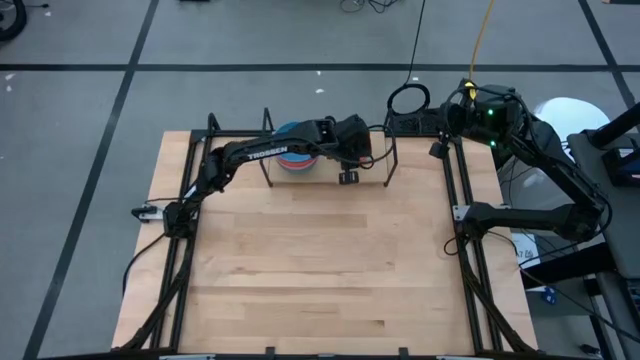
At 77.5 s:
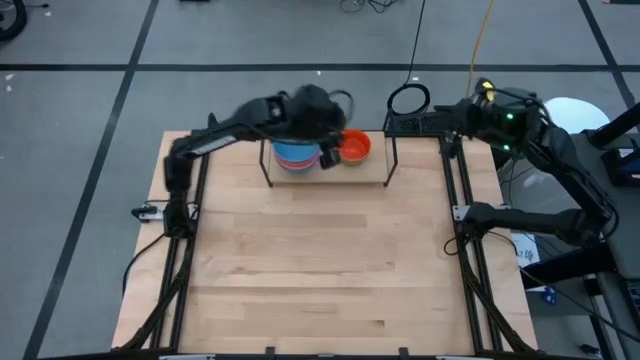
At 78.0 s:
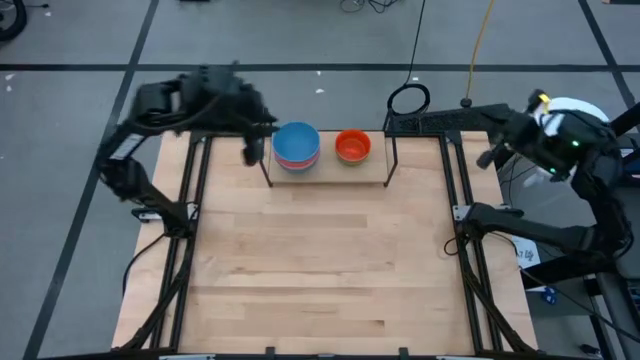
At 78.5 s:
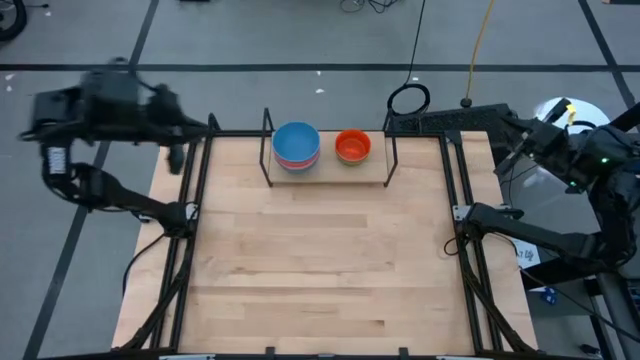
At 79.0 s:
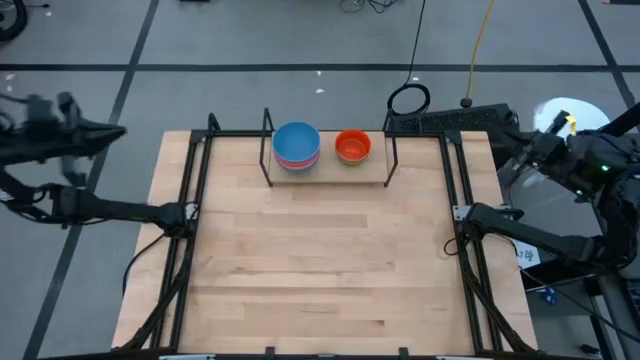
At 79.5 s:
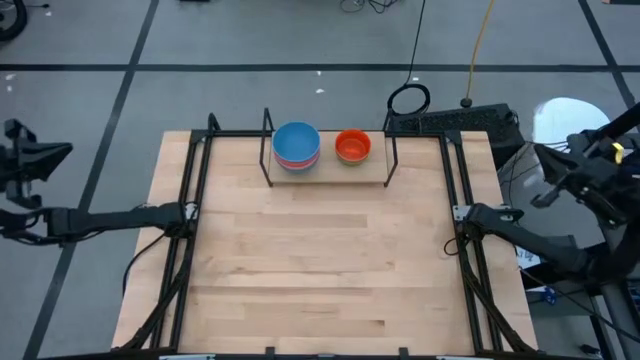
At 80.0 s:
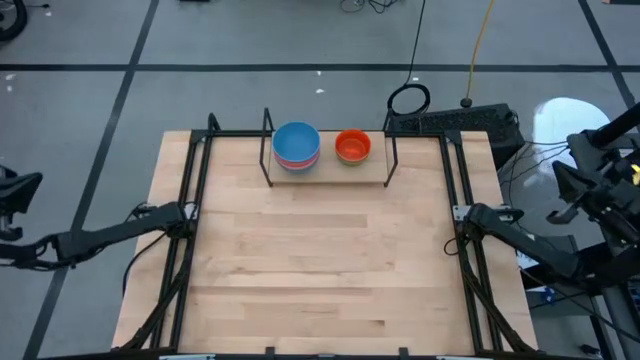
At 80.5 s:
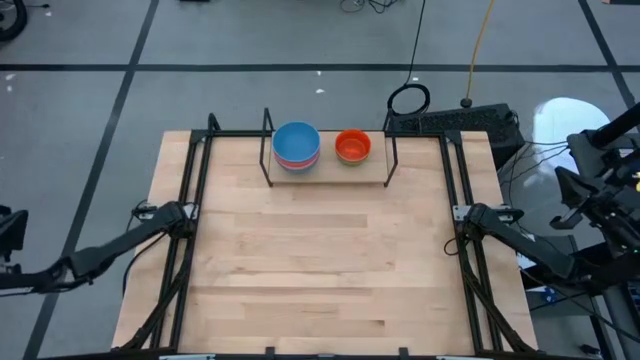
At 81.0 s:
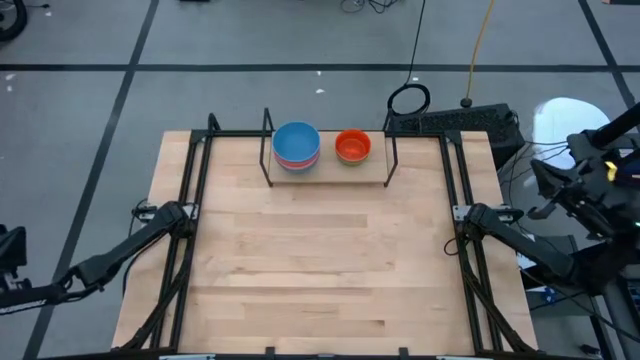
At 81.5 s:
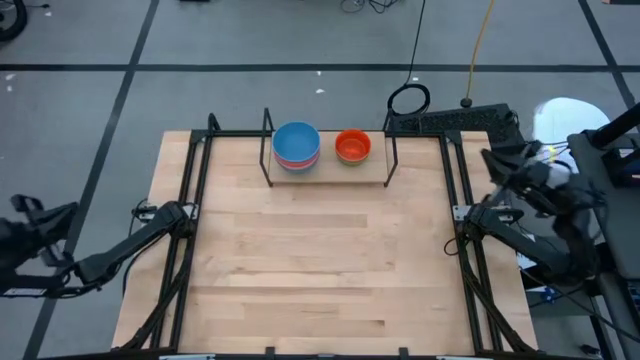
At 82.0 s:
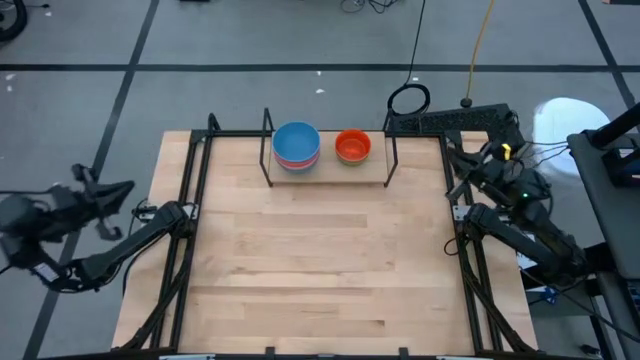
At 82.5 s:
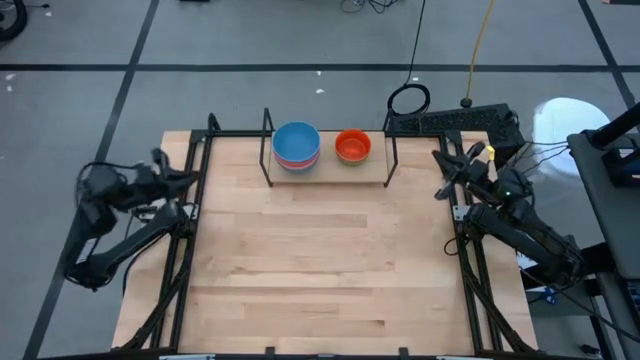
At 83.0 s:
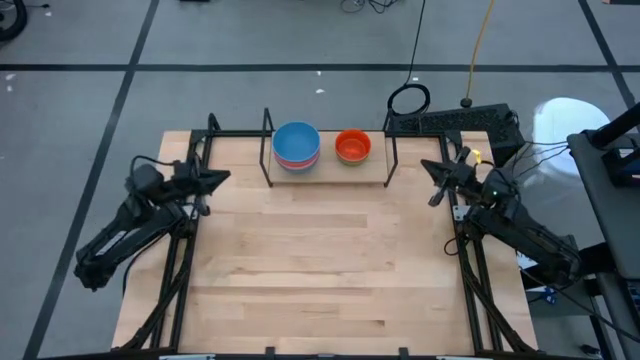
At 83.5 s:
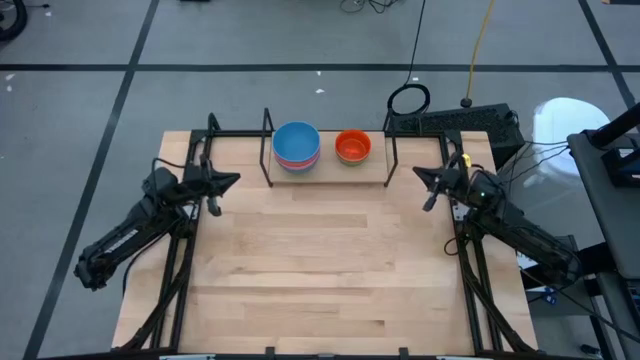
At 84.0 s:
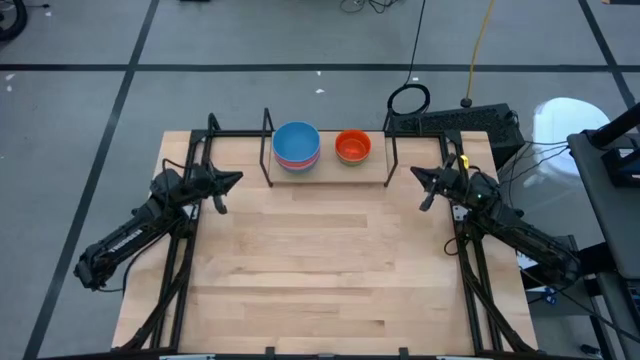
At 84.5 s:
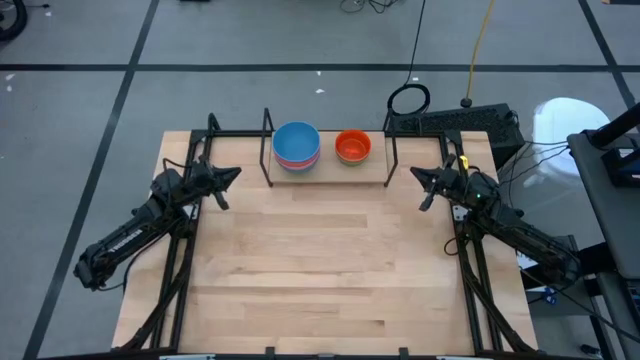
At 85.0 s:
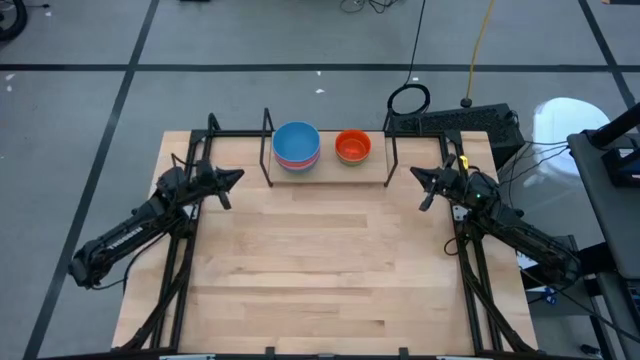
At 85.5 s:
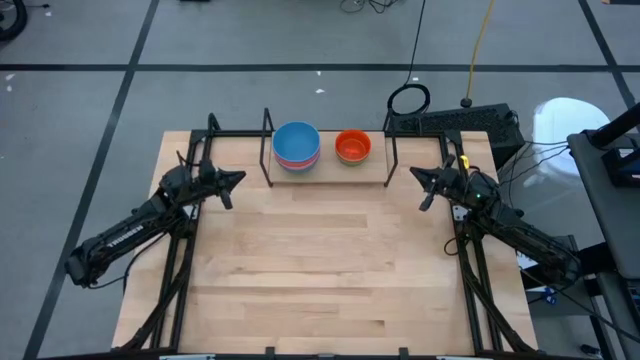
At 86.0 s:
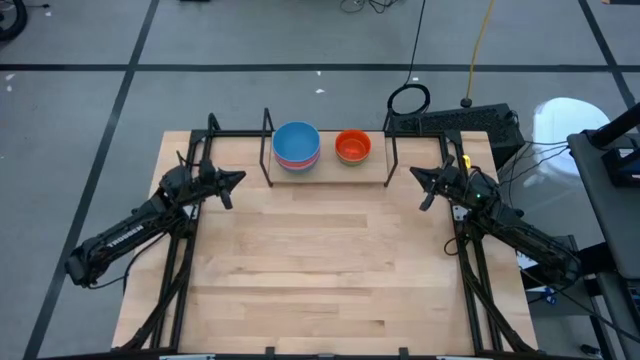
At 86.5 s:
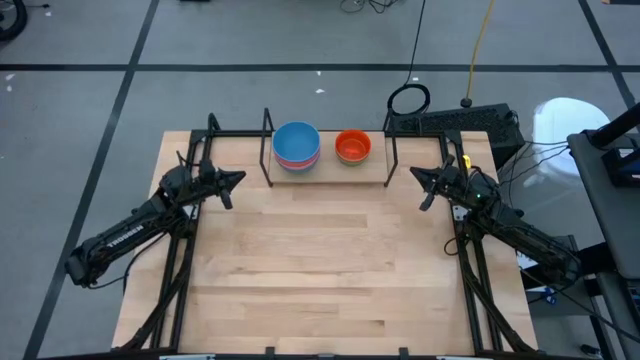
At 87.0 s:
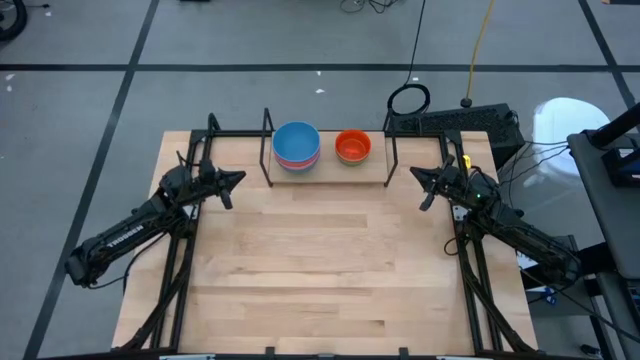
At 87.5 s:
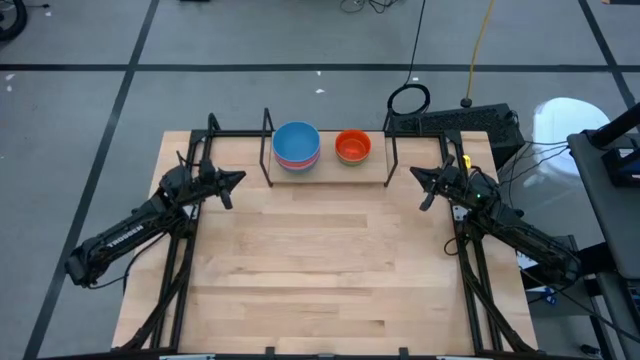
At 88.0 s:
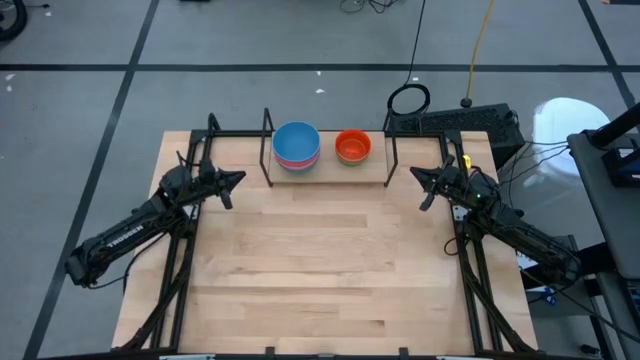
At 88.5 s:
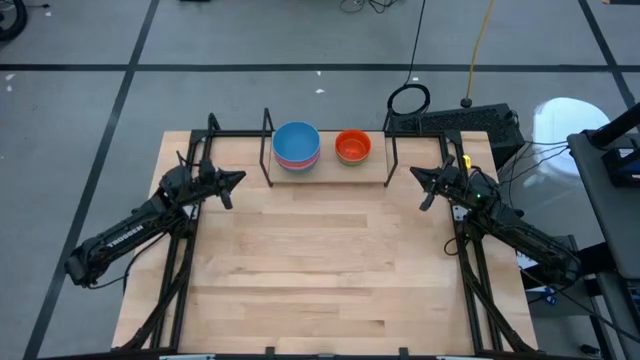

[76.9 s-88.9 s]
Task: Place and stack bowls onto a shelf
Return to Home Position

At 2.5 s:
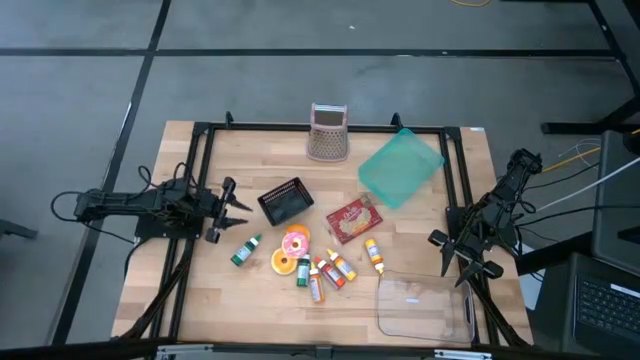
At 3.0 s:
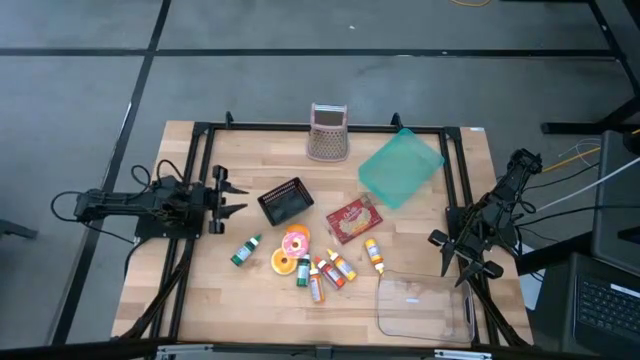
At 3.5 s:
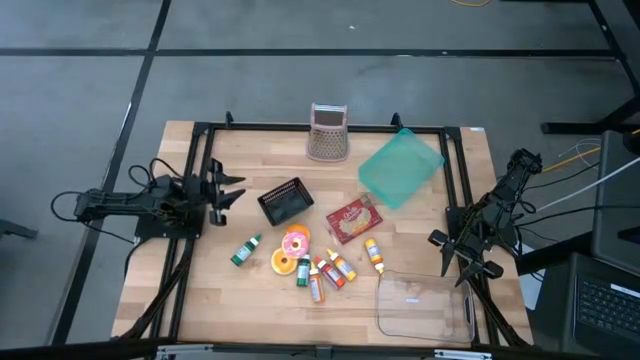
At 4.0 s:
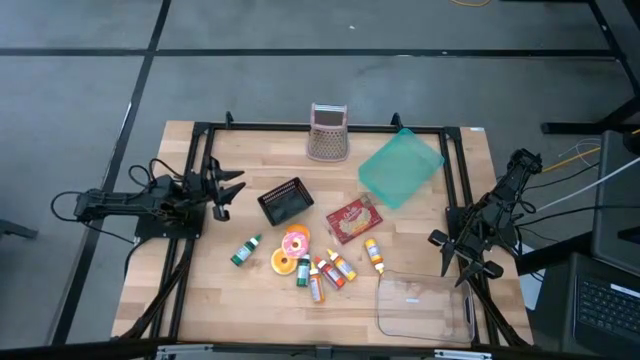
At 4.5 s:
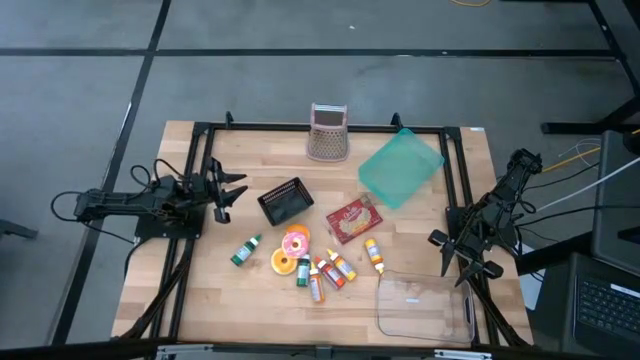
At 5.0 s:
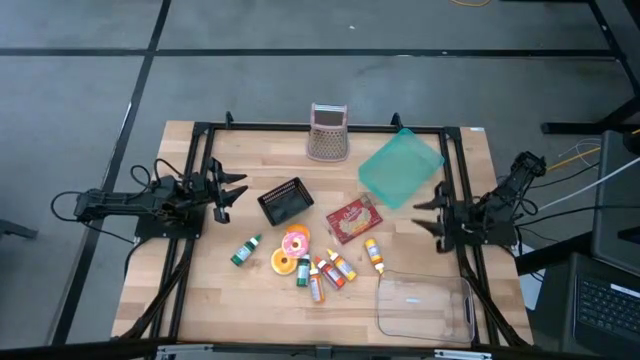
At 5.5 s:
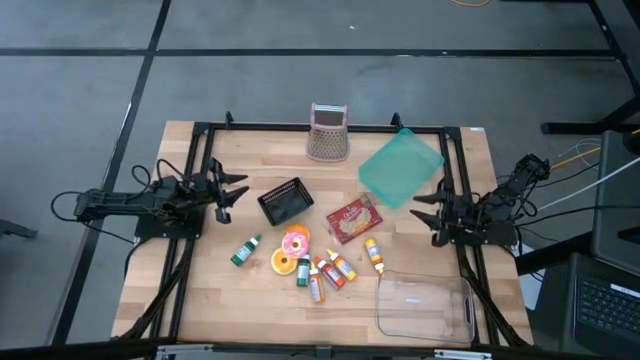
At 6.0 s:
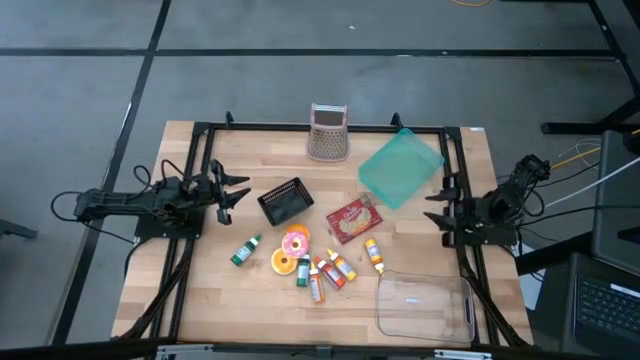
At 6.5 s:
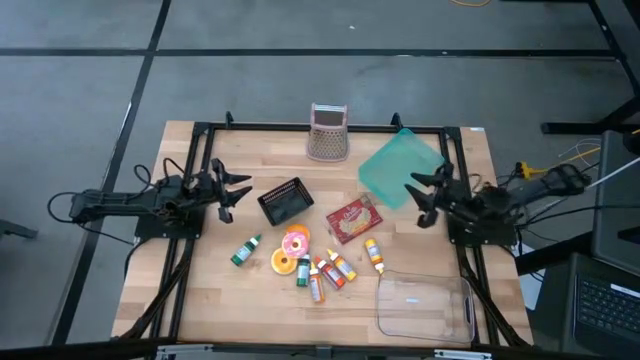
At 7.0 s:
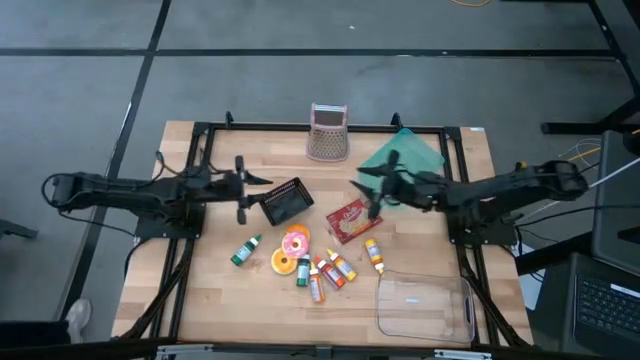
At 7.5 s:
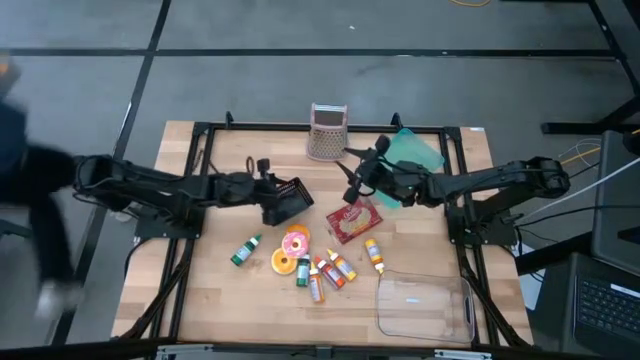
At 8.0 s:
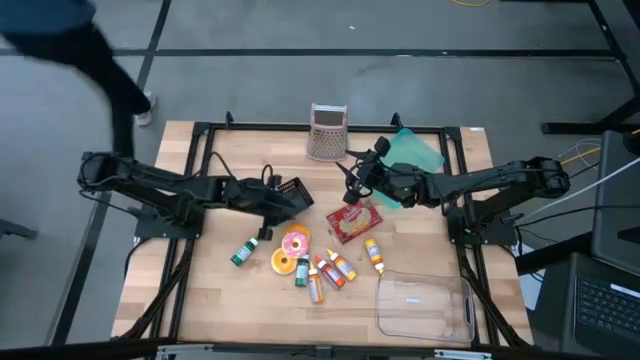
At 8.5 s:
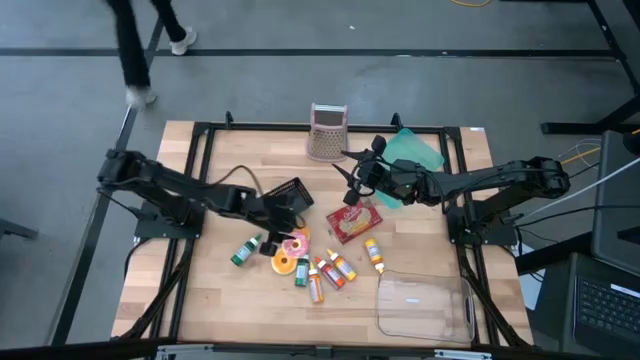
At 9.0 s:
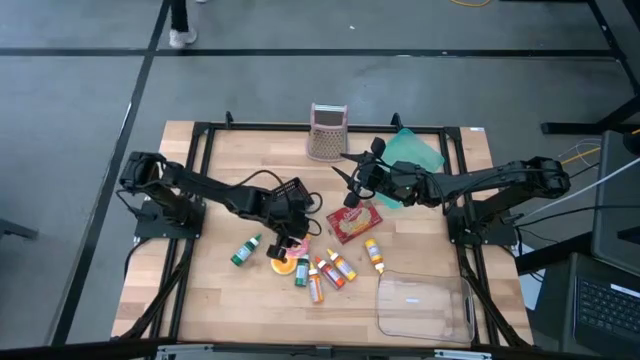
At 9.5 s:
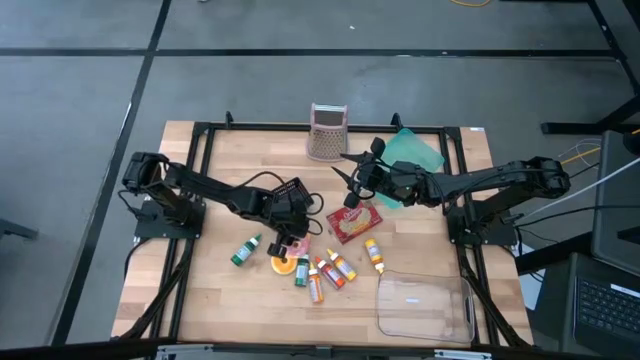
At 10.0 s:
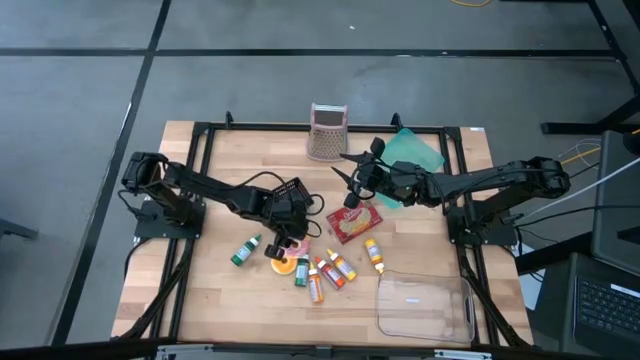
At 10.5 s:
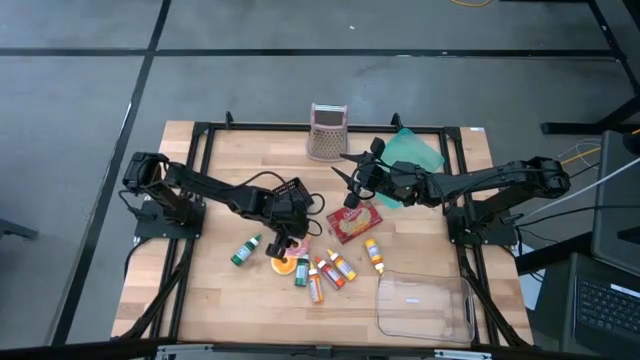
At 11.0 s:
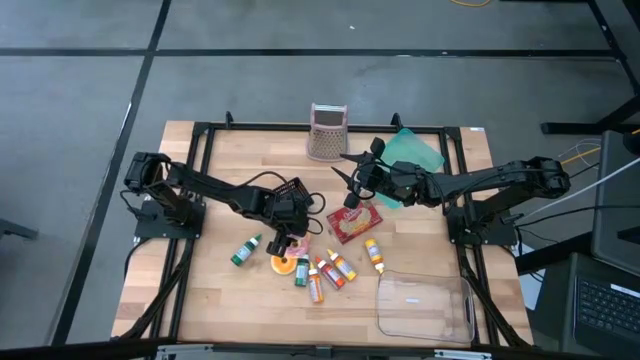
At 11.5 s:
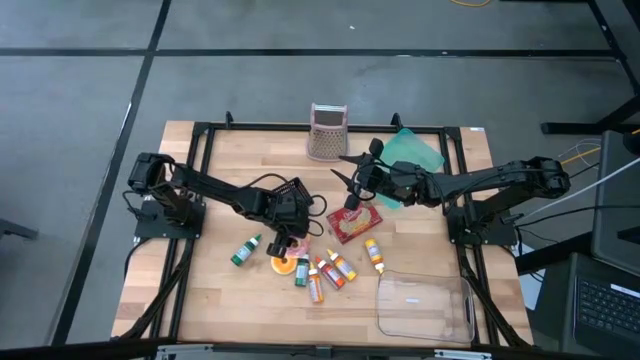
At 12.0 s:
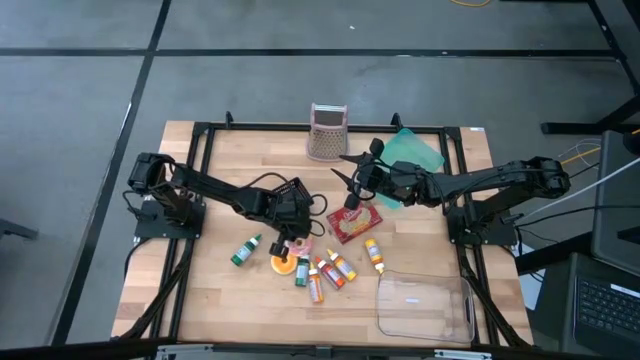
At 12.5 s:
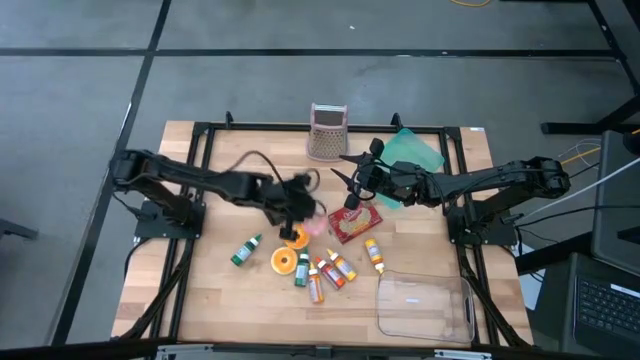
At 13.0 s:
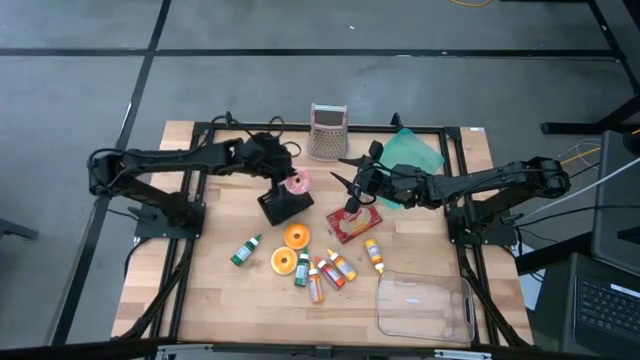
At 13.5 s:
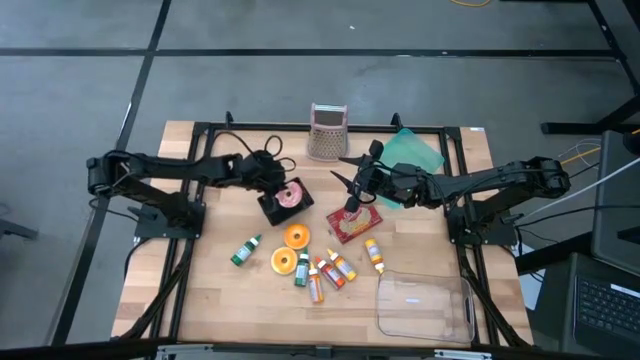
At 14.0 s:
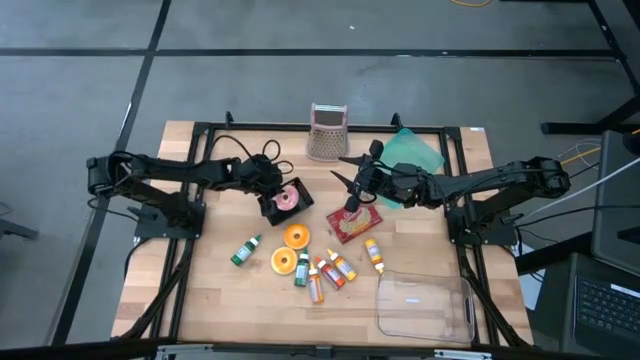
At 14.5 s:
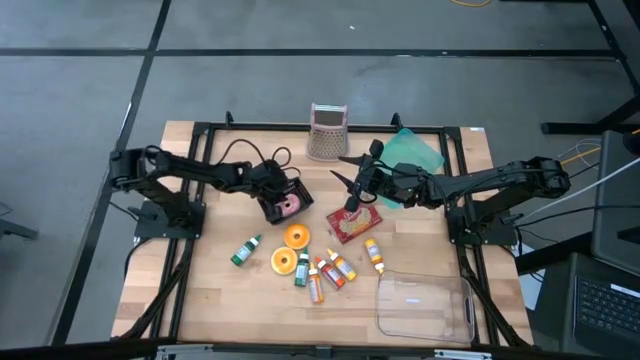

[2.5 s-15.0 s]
Task: Pick & Place Food Item
Put the pink donut into the black bin
